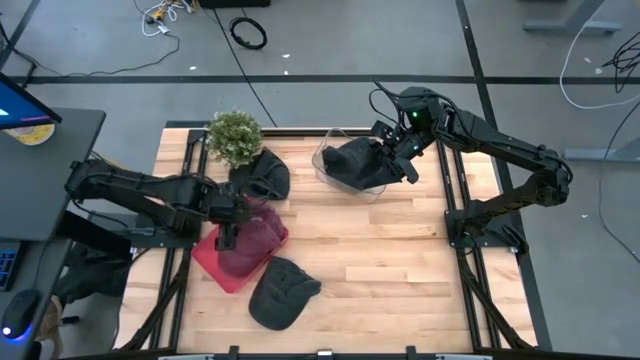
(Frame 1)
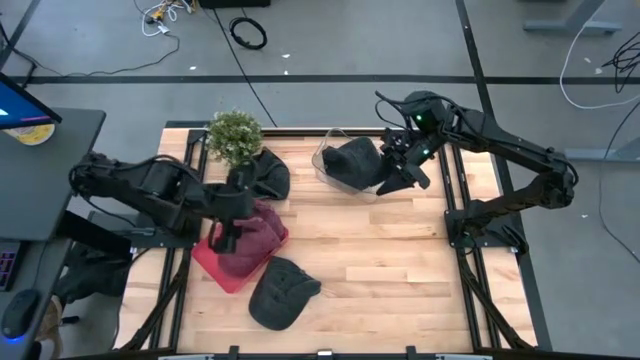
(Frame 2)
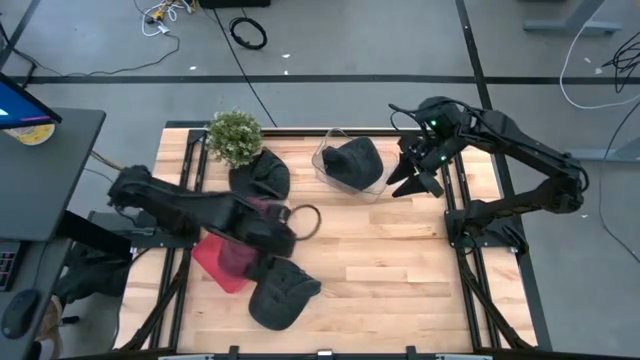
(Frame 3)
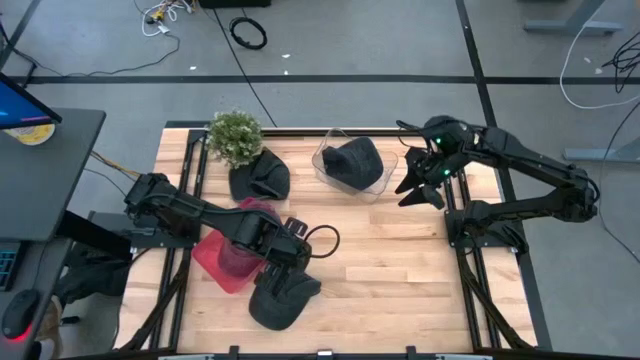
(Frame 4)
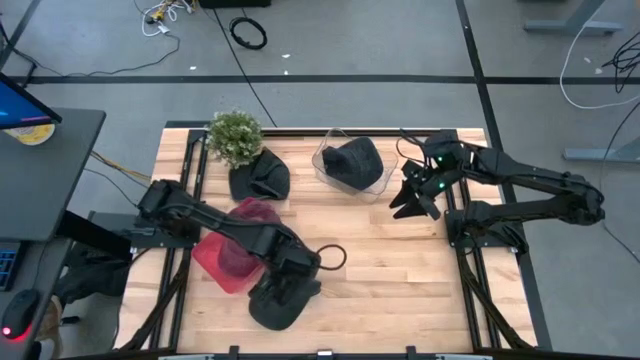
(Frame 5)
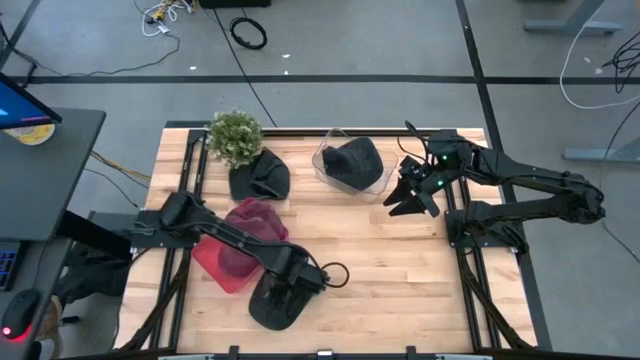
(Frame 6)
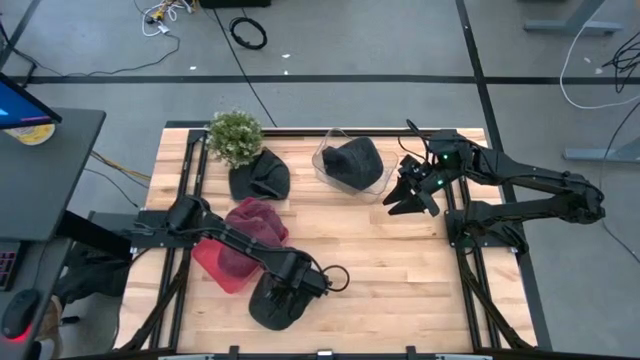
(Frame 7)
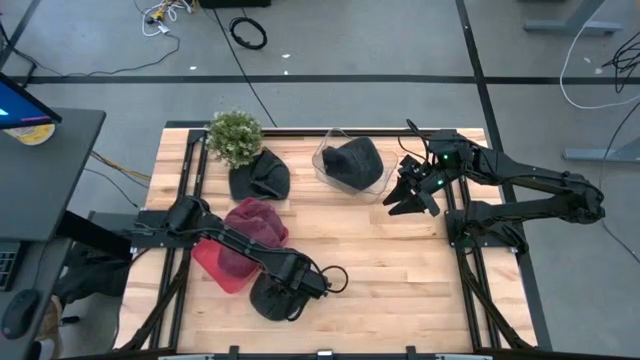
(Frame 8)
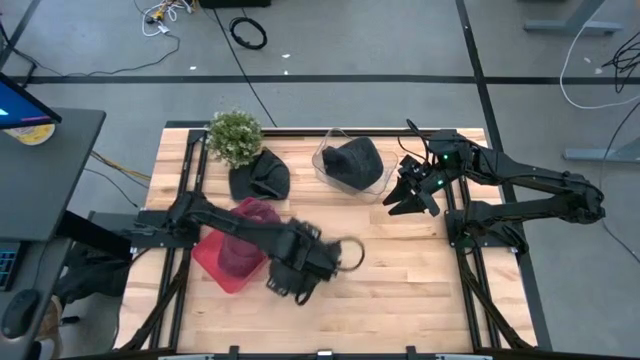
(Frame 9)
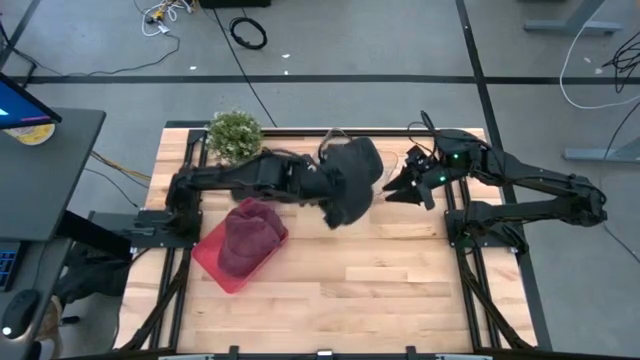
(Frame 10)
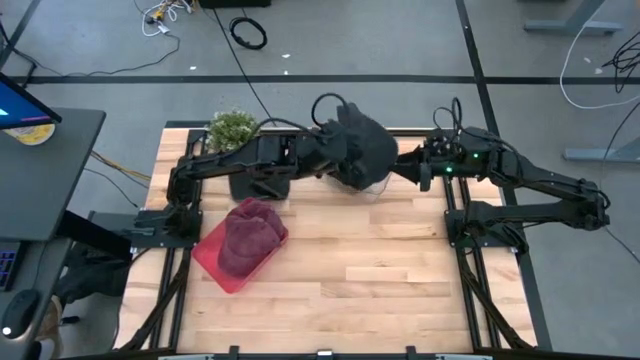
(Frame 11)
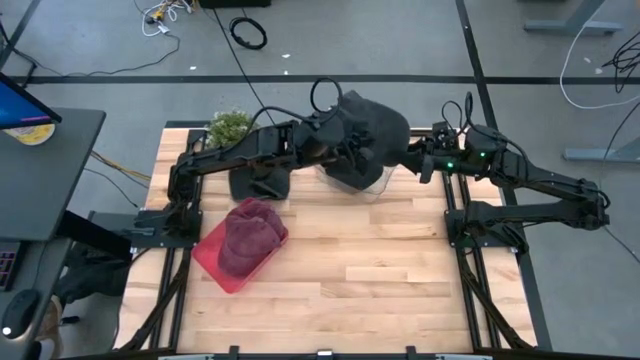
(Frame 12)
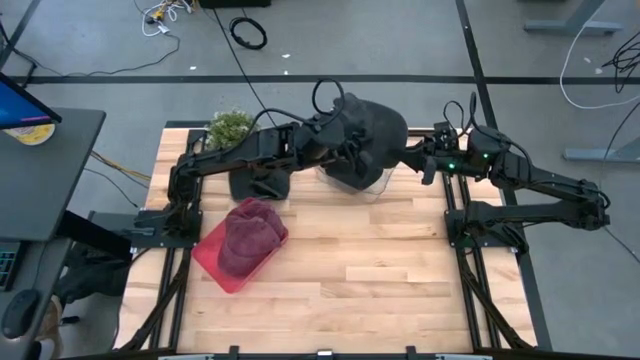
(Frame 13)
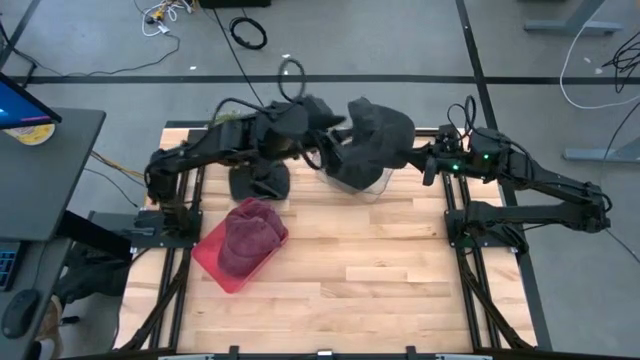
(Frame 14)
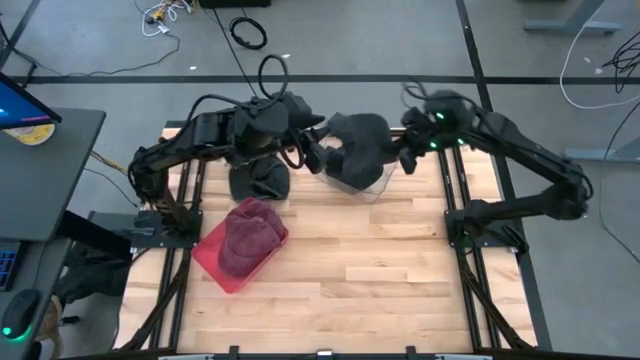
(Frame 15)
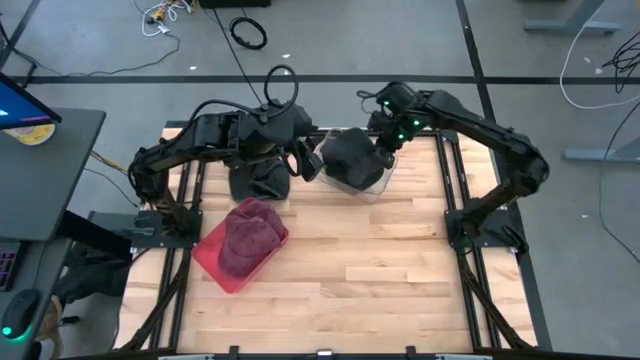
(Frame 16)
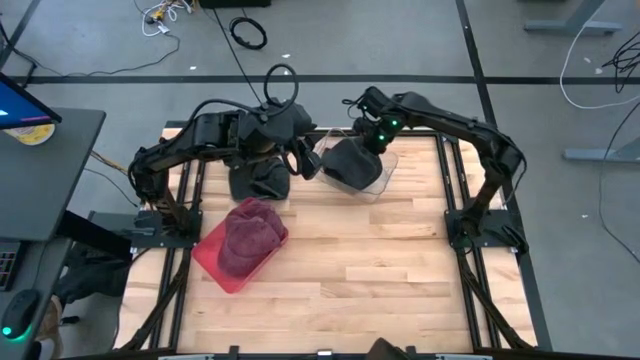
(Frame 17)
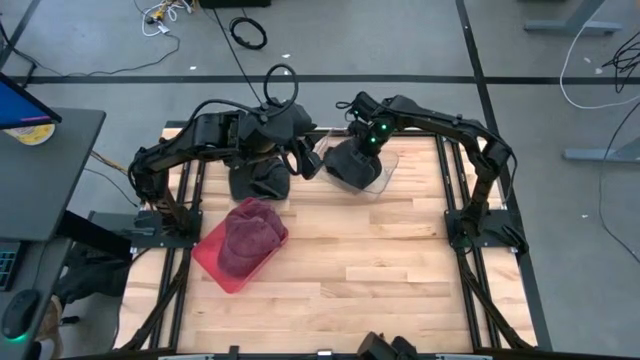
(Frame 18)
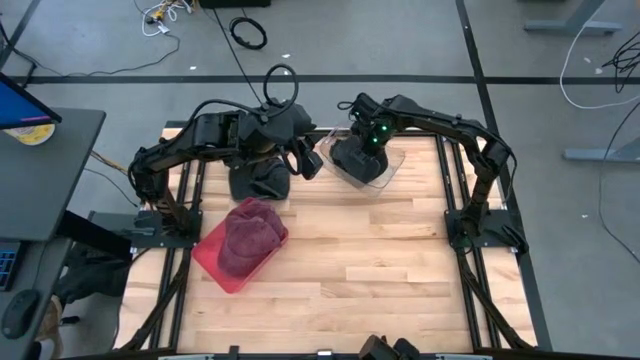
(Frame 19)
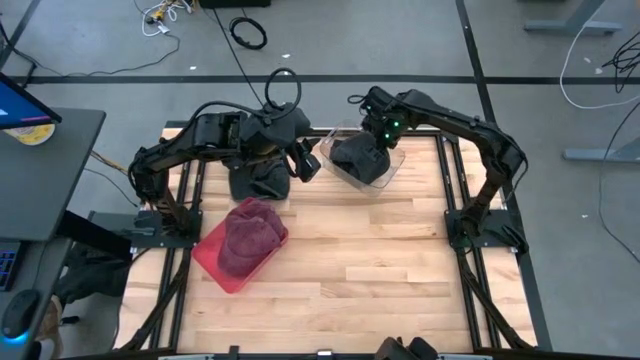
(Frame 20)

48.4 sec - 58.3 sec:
Task: Pick & Place hat
Put the bottom black cap into the transparent bin

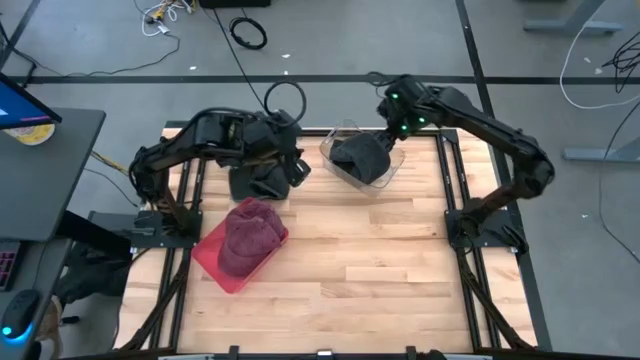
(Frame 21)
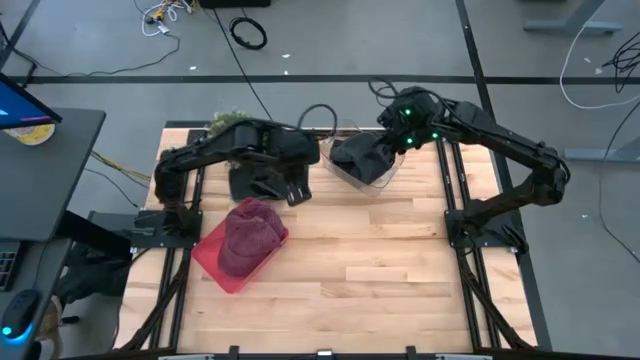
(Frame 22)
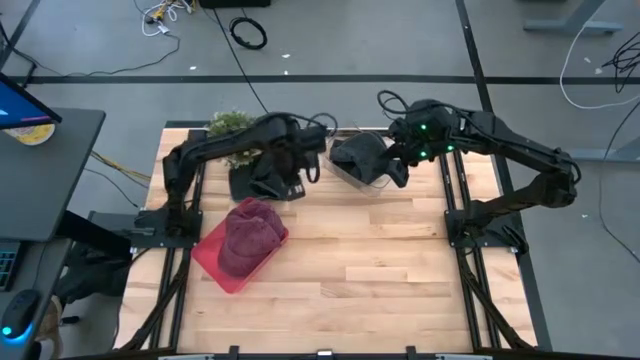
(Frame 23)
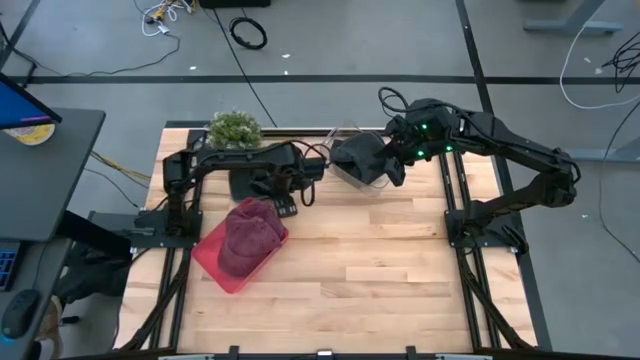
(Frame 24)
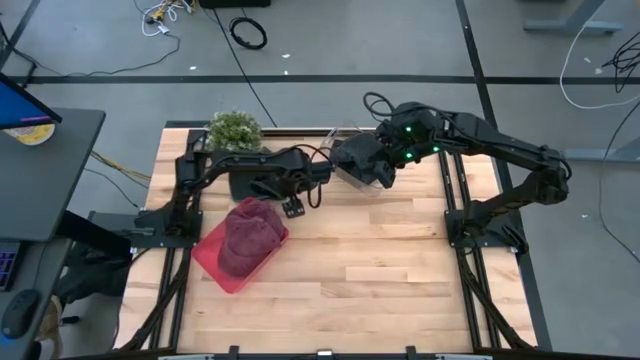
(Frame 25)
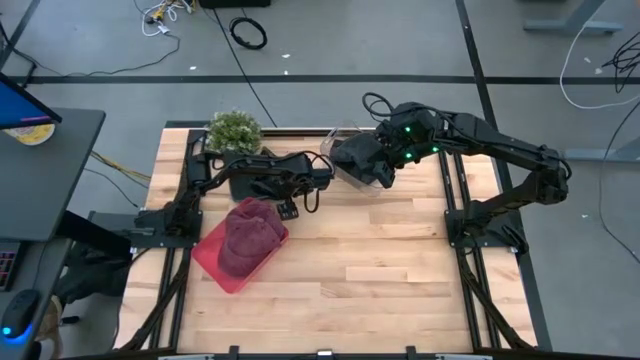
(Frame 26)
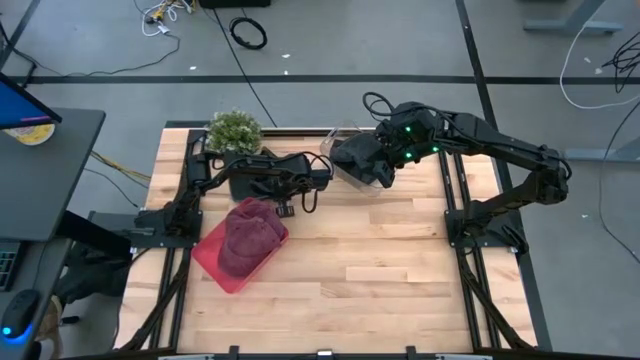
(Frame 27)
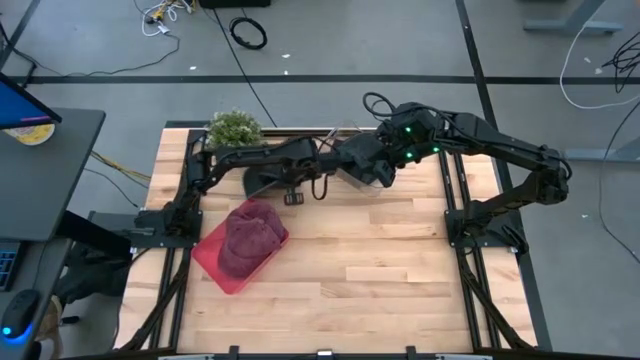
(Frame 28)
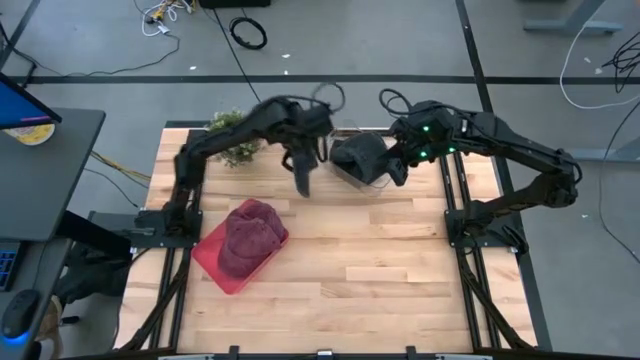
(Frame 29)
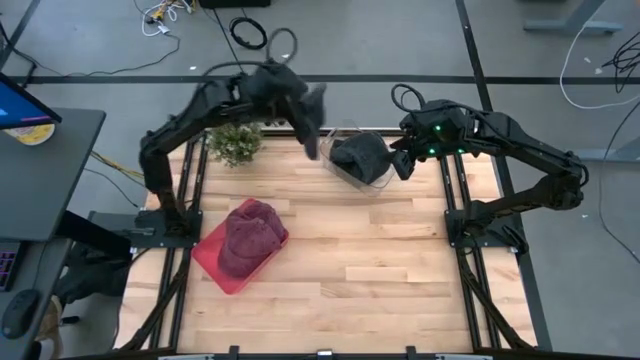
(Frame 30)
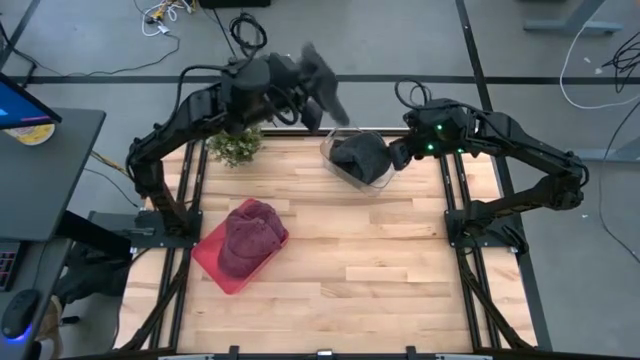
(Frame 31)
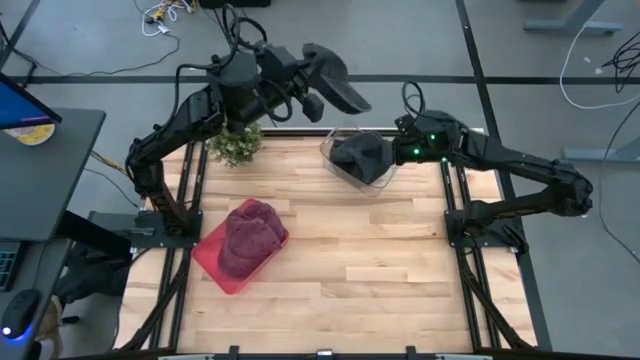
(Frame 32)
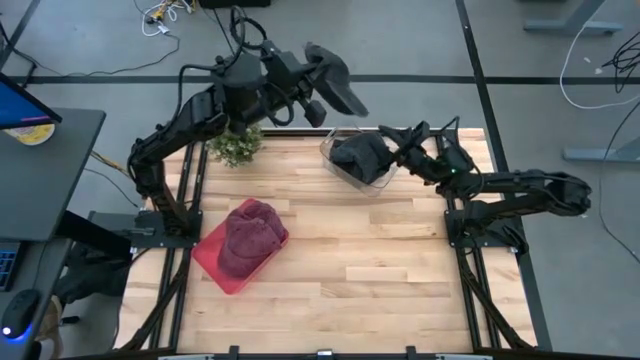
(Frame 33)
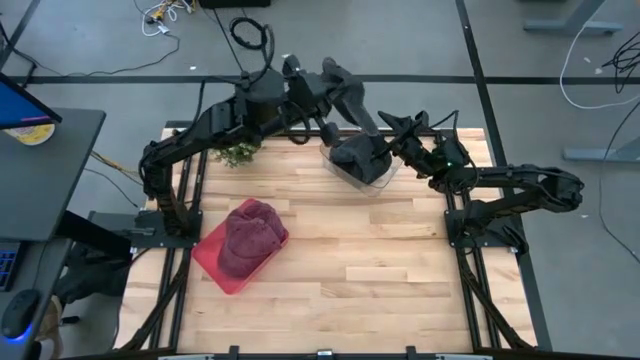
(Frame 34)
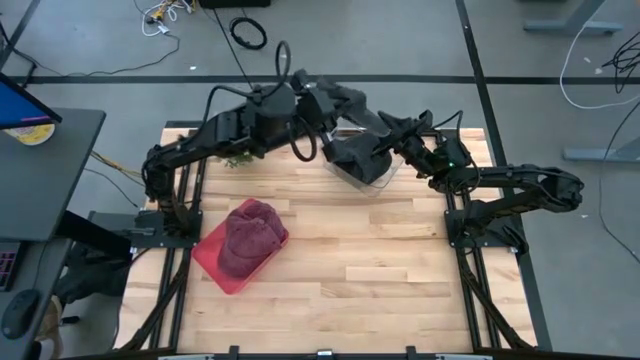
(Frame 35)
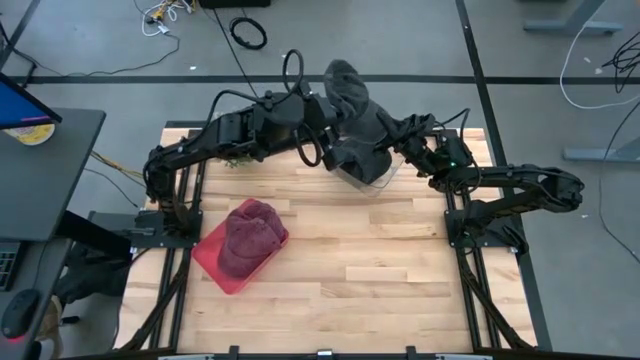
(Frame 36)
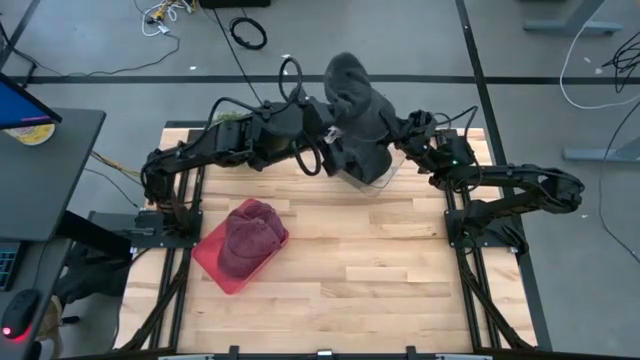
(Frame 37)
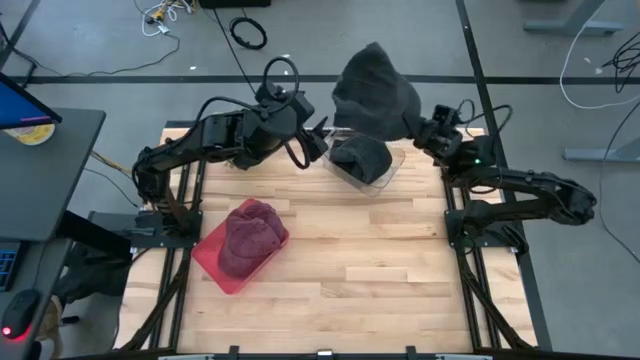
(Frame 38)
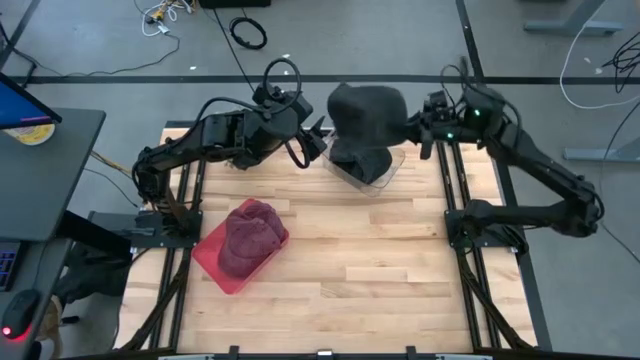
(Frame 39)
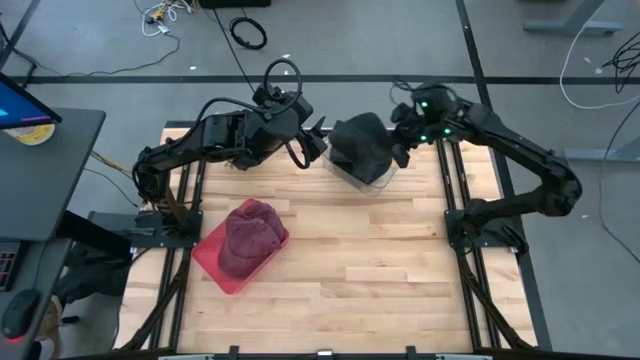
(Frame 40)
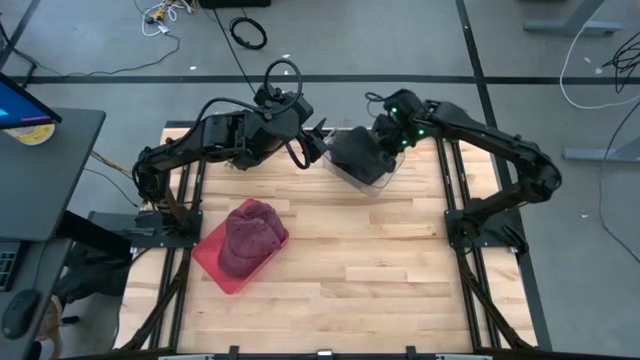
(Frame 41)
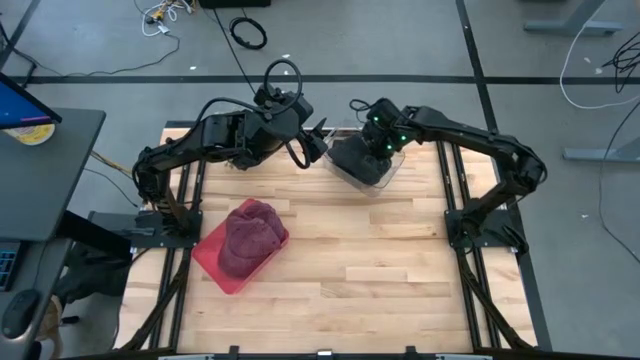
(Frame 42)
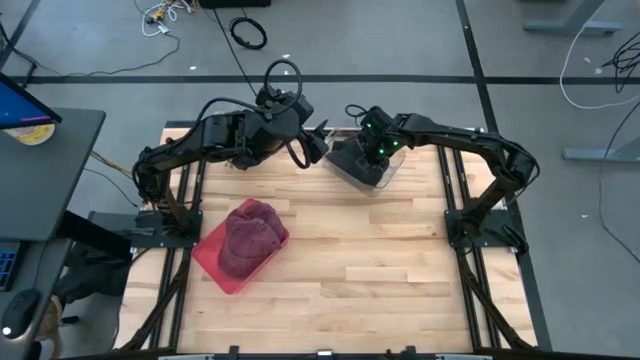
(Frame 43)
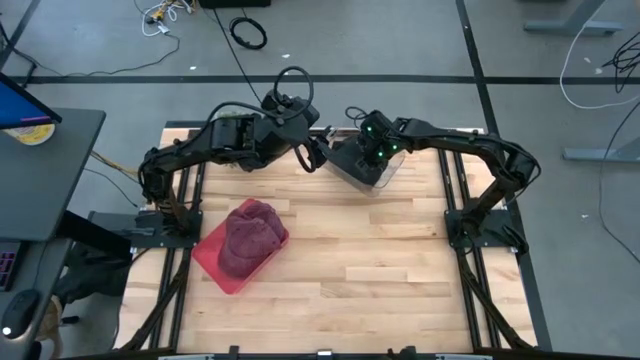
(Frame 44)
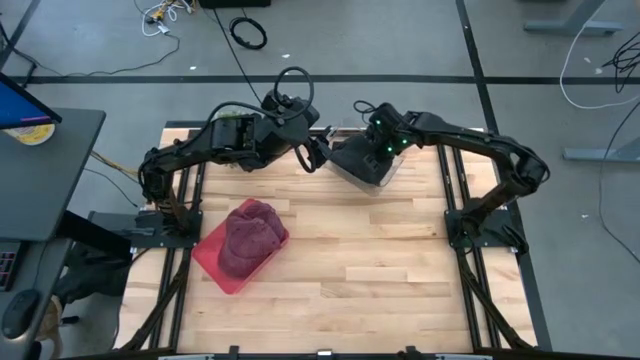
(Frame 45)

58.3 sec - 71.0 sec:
Put the black cap into the transparent bin

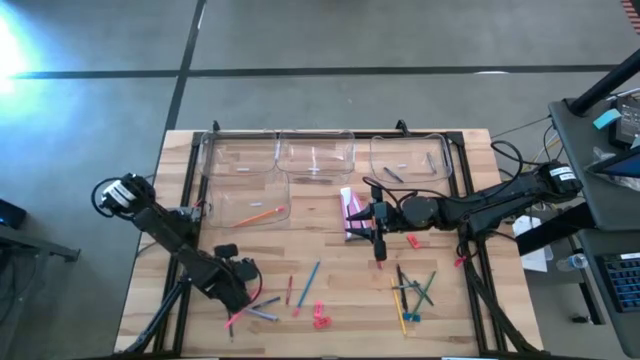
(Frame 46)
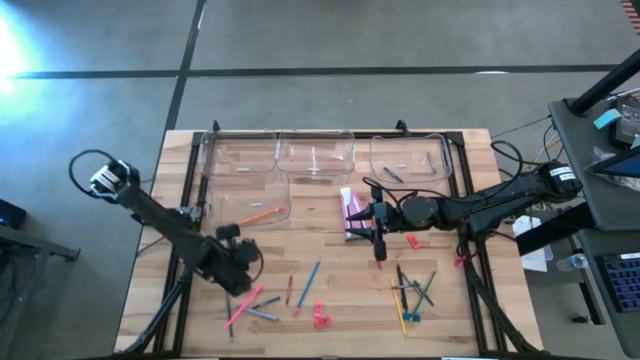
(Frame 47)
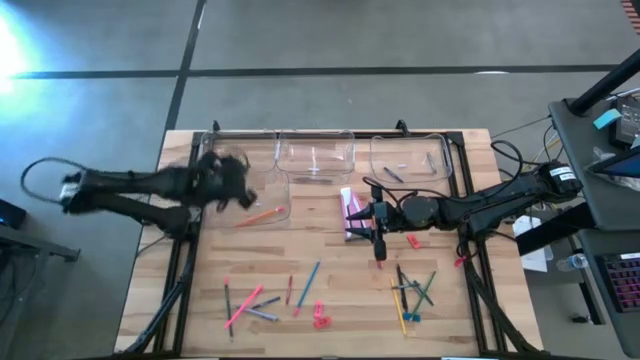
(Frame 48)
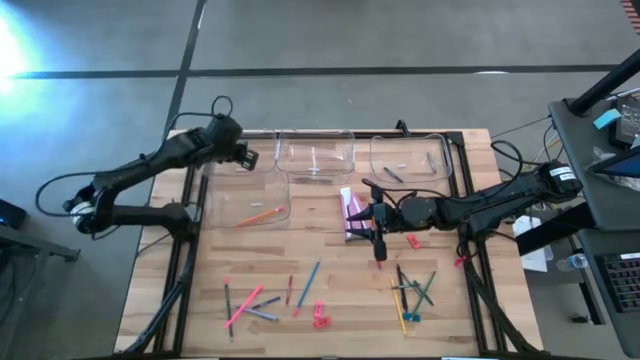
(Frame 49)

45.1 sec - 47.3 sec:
Task: Sort crayons/erasers/pens/pencils in bins
Put the blue eraser into the top left transparent bin
